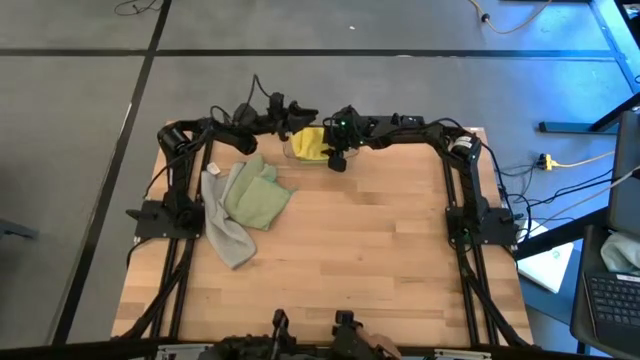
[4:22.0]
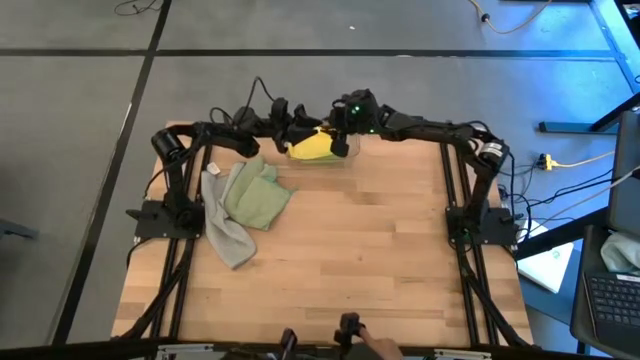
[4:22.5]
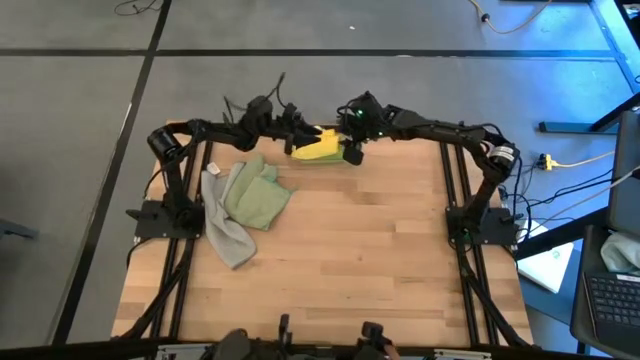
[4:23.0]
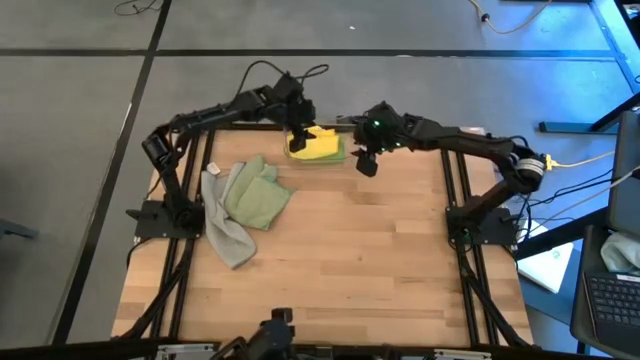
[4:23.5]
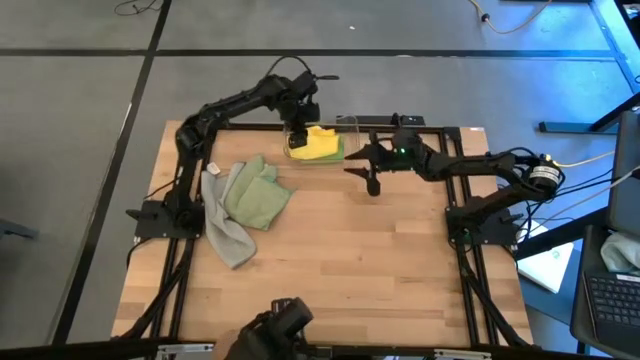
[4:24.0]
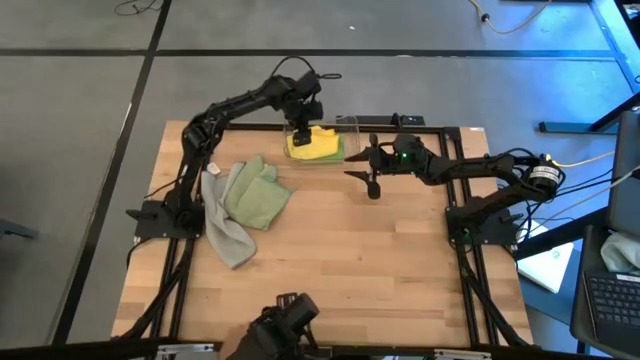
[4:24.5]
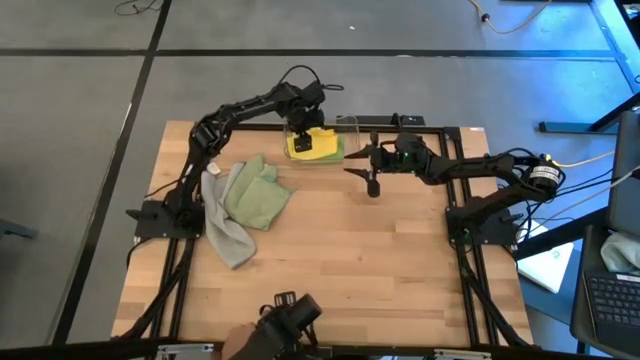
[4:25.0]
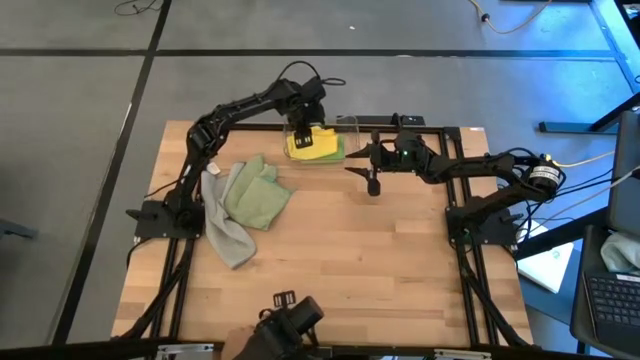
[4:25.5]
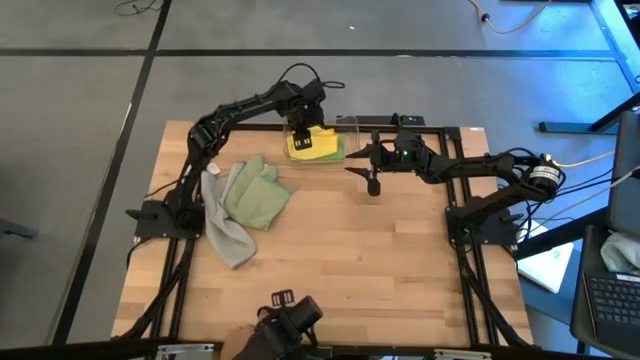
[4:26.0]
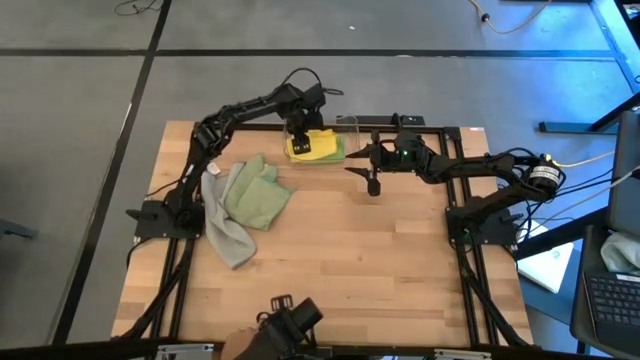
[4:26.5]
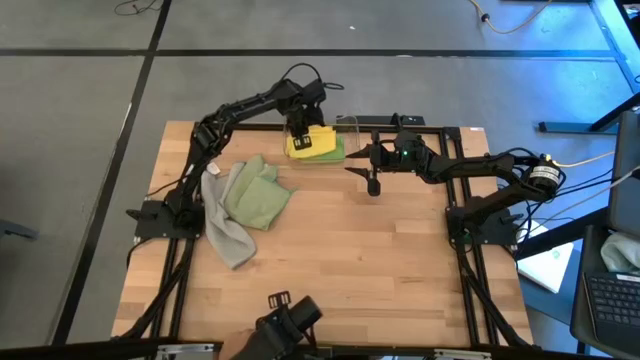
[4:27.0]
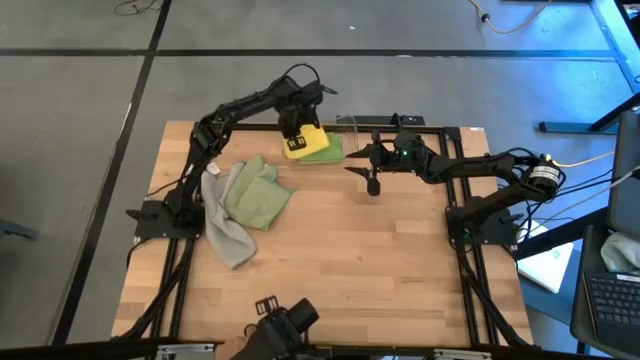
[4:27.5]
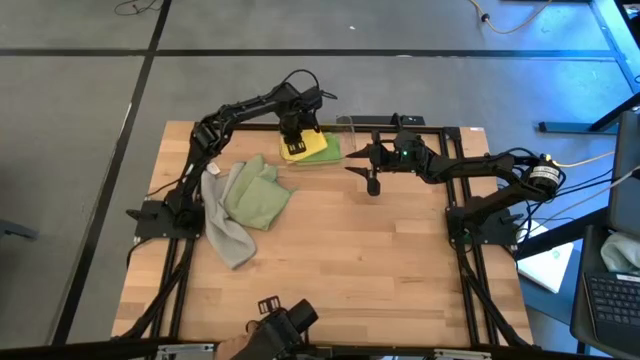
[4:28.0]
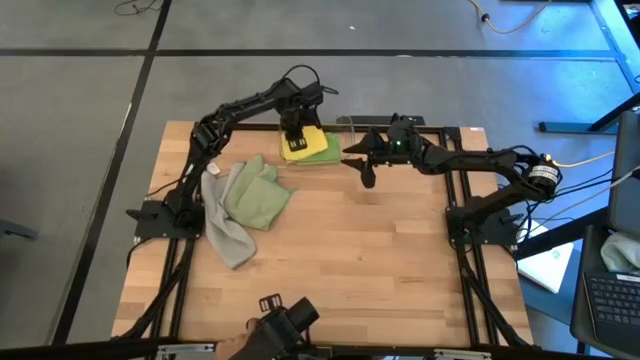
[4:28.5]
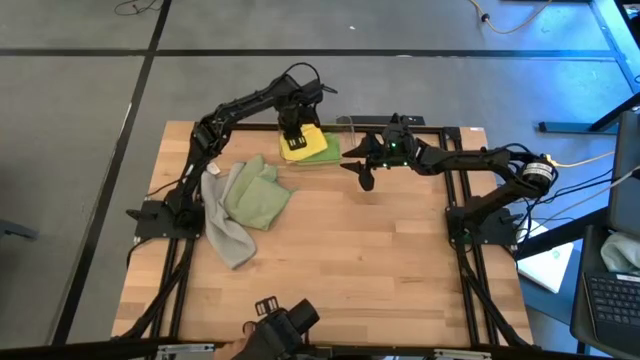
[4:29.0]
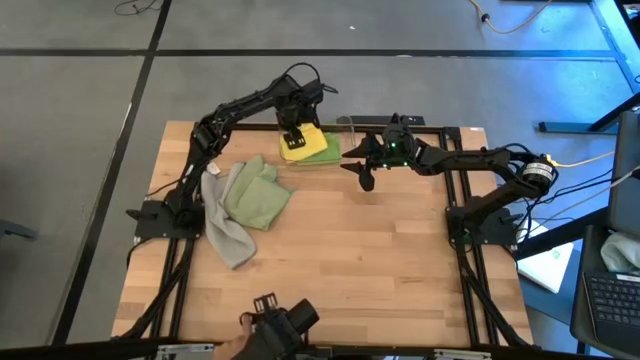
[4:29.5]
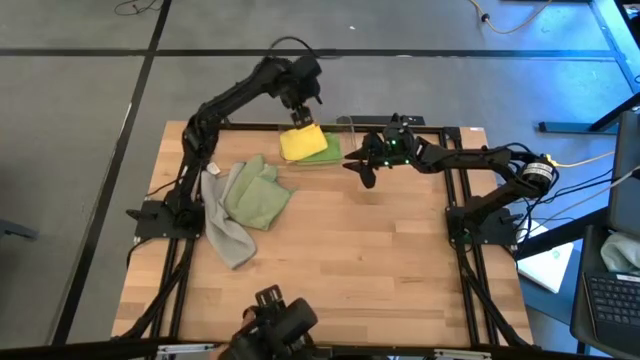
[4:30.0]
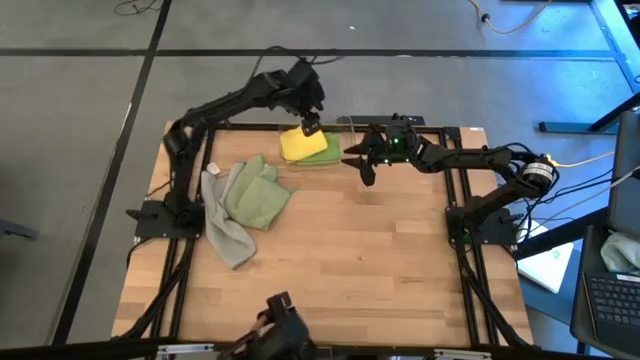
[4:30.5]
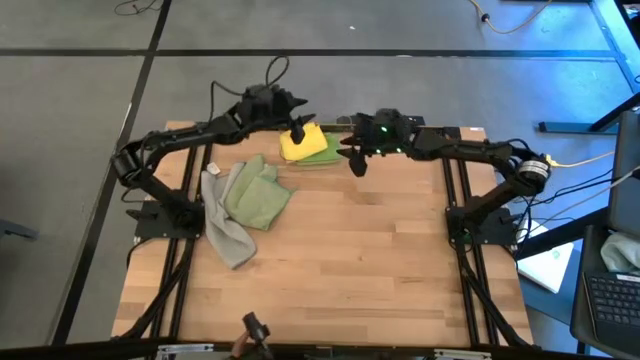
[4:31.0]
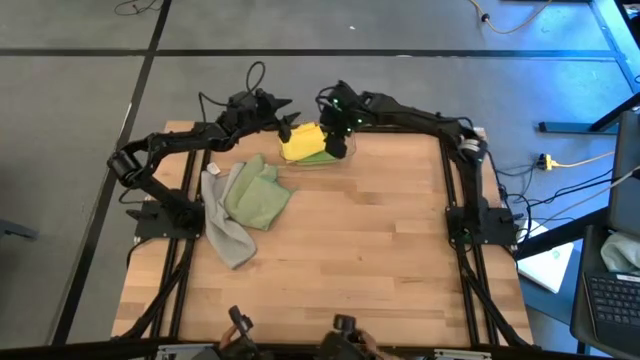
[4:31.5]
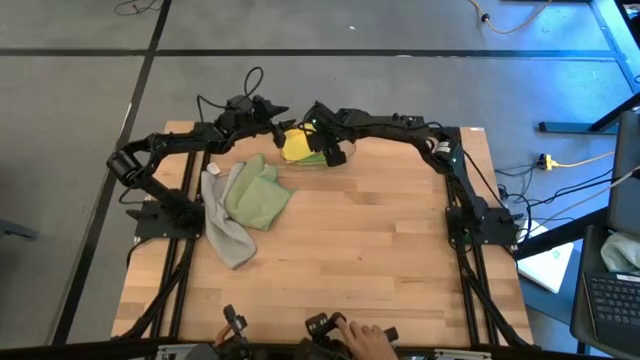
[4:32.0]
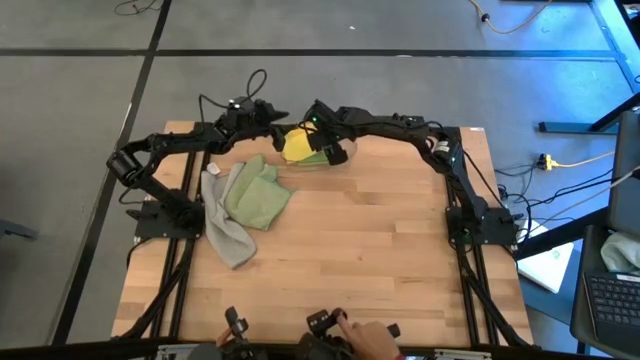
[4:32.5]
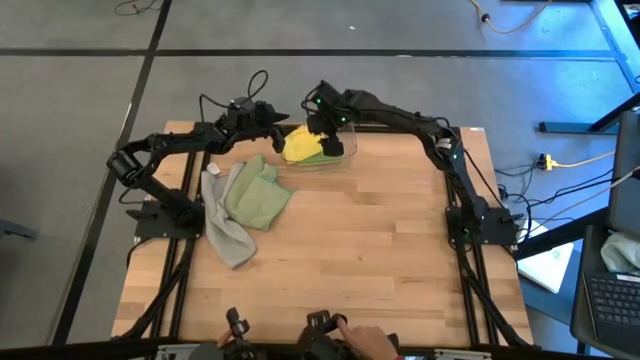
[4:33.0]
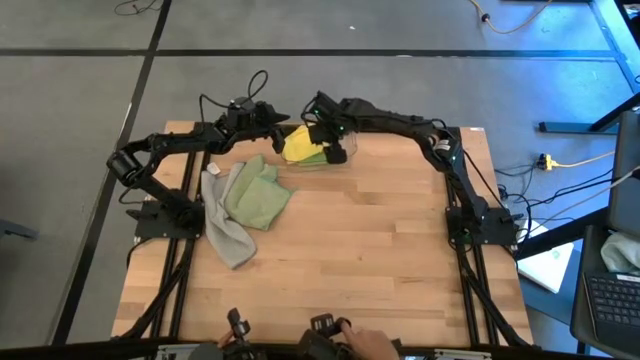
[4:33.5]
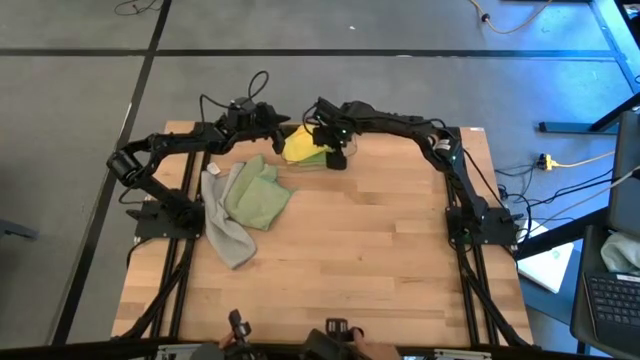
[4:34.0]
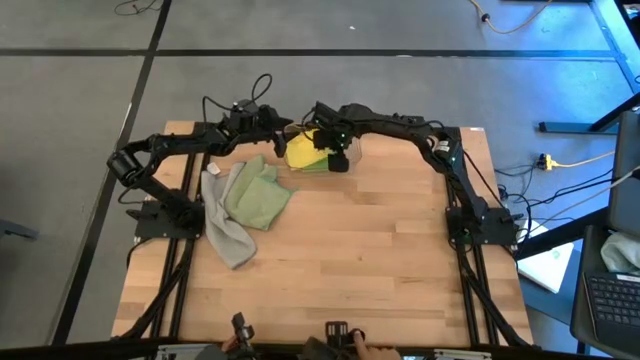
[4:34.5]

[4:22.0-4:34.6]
Task: Fold microfiber towels
Put the yellow microfiber cloth into the transparent bin

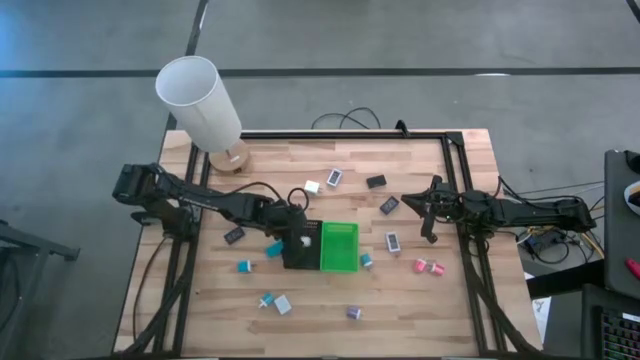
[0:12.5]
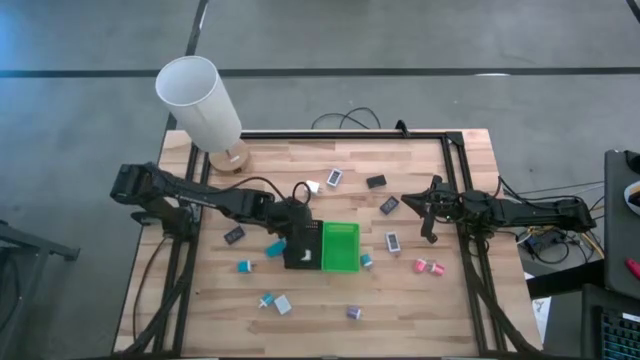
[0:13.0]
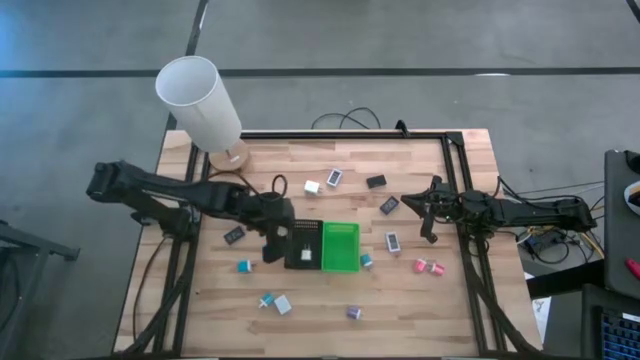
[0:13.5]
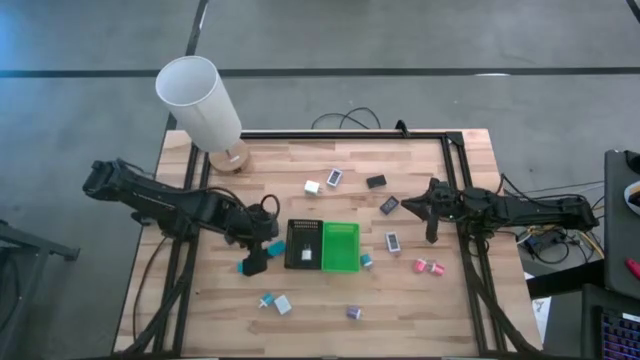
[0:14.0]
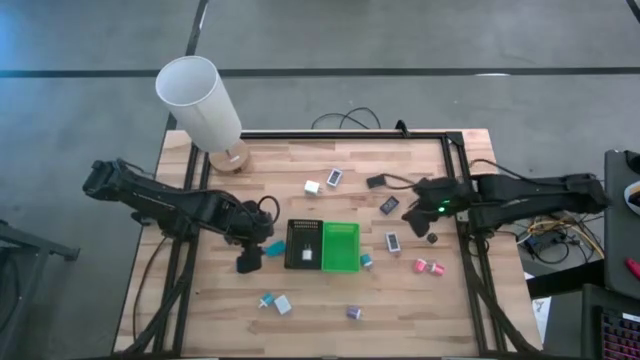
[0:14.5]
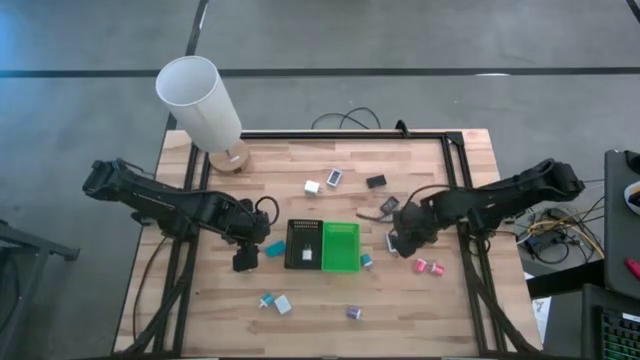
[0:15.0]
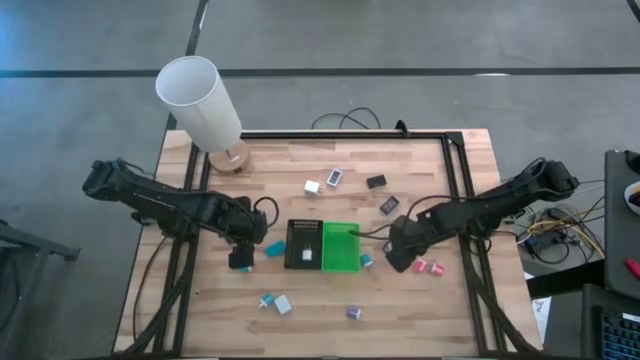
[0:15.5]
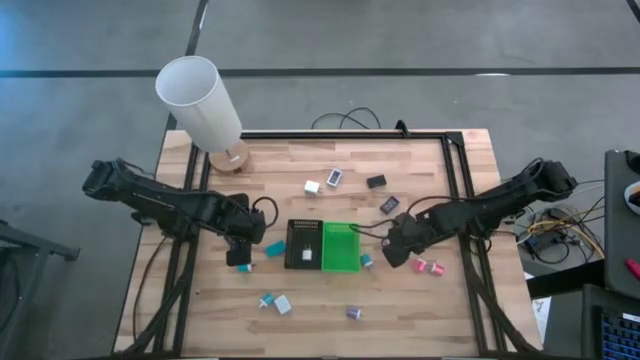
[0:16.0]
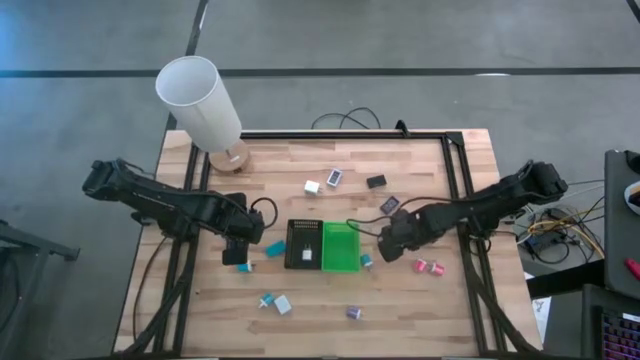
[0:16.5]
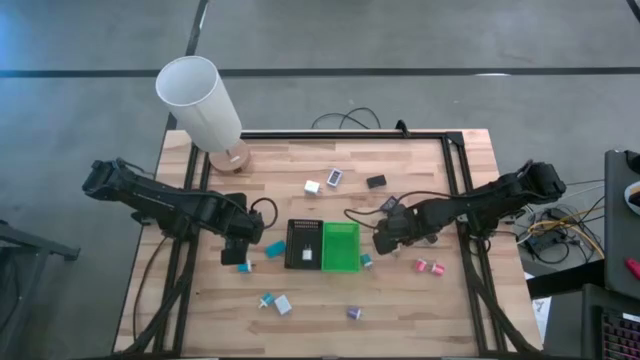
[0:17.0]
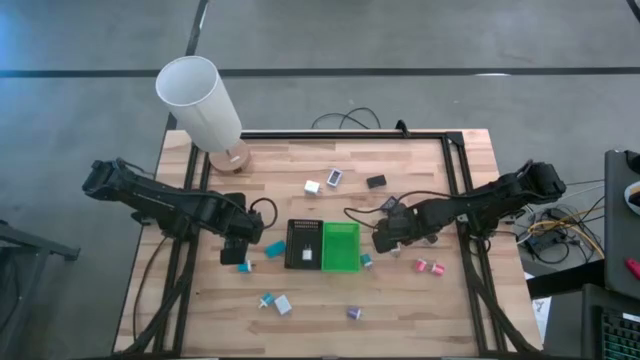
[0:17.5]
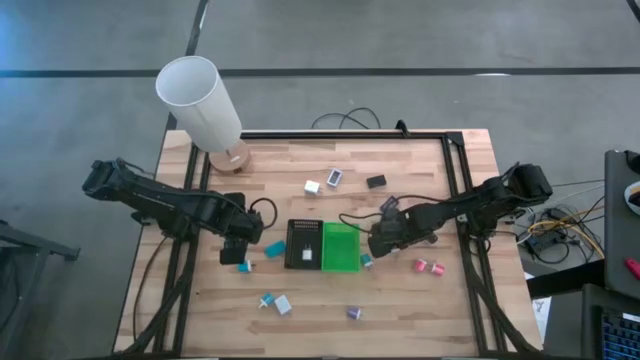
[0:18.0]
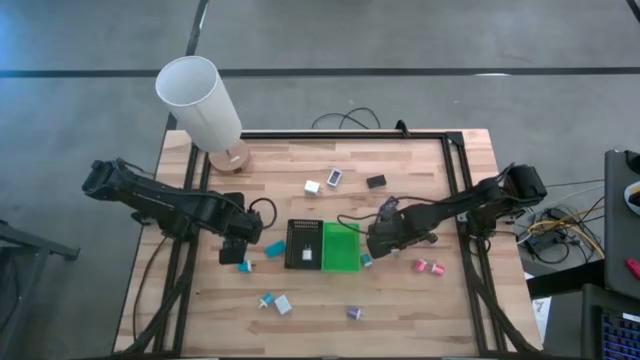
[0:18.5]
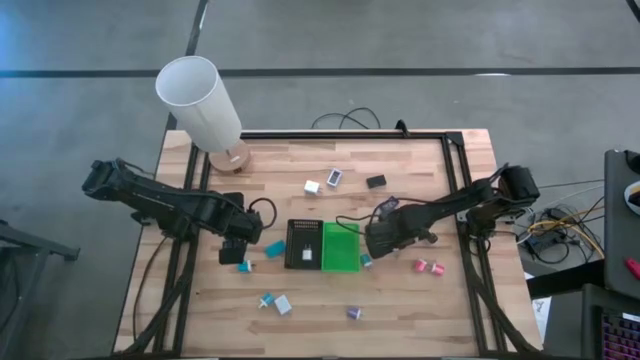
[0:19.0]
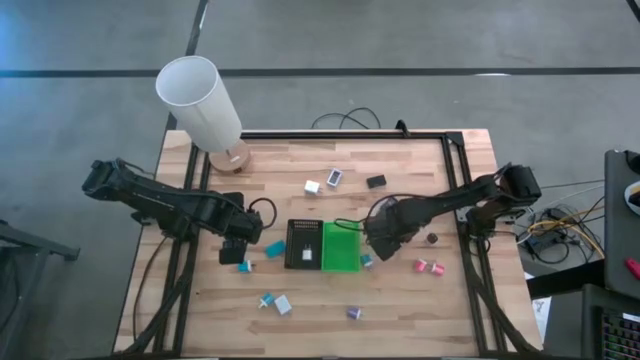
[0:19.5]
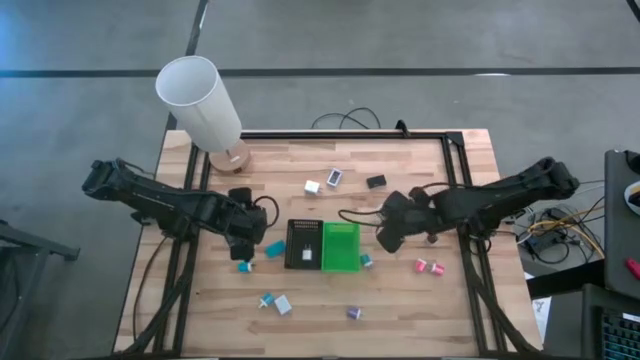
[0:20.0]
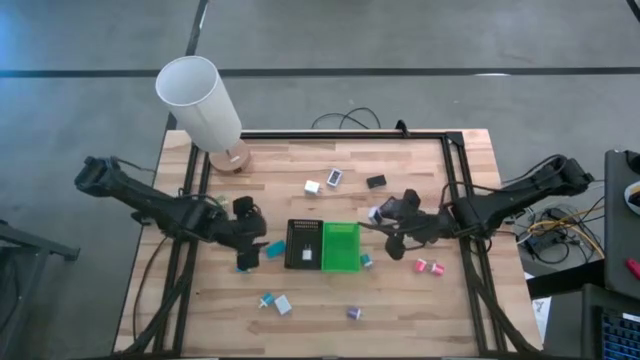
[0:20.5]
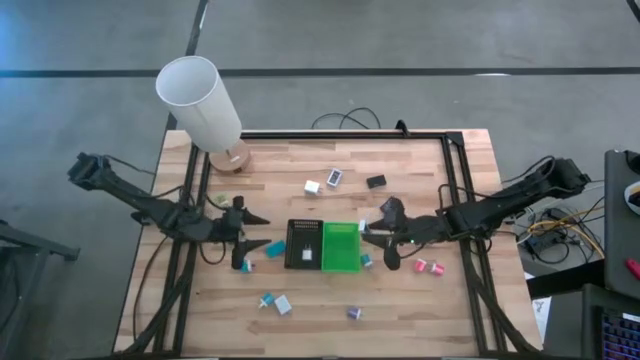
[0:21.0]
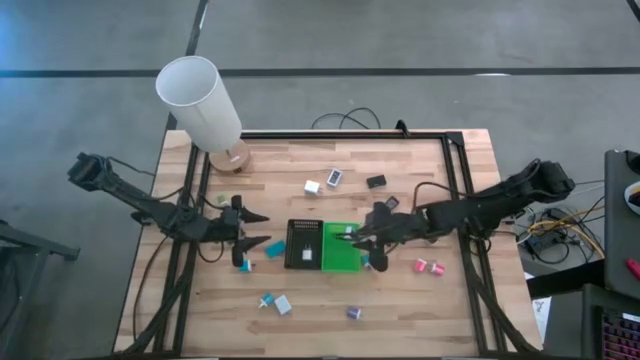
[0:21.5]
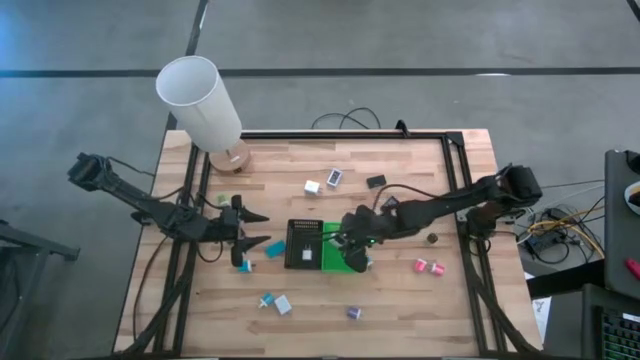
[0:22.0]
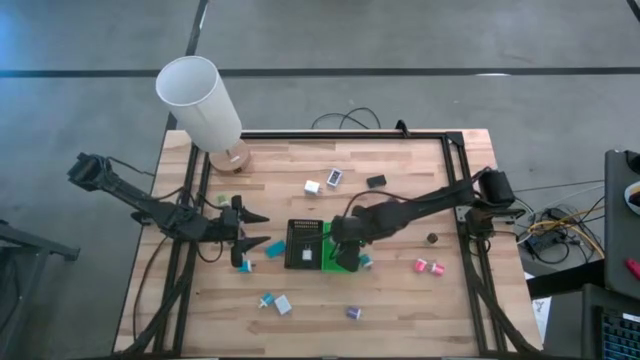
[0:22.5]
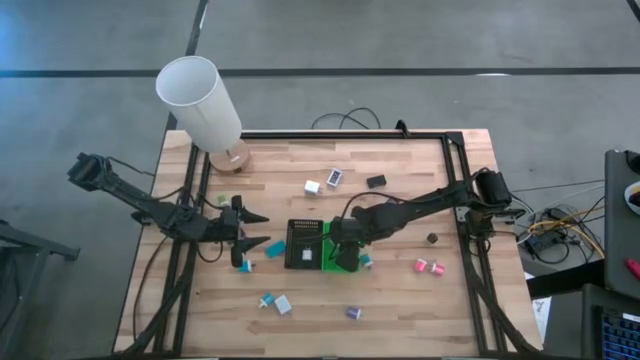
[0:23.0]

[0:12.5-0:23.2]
Task: Pick & Place Office items
Put the white timer into the green bin
